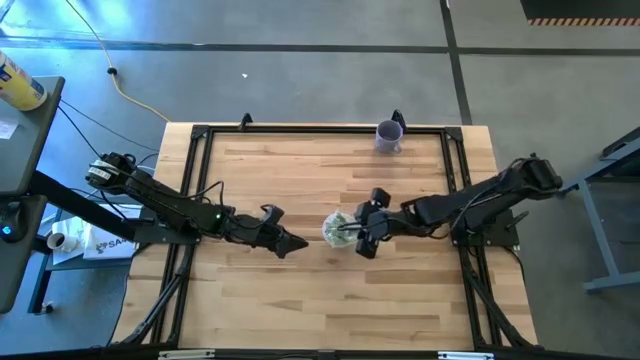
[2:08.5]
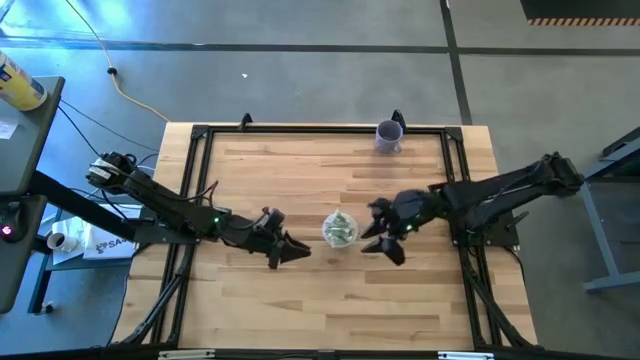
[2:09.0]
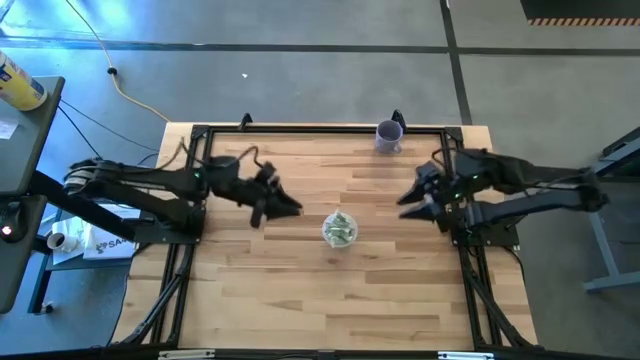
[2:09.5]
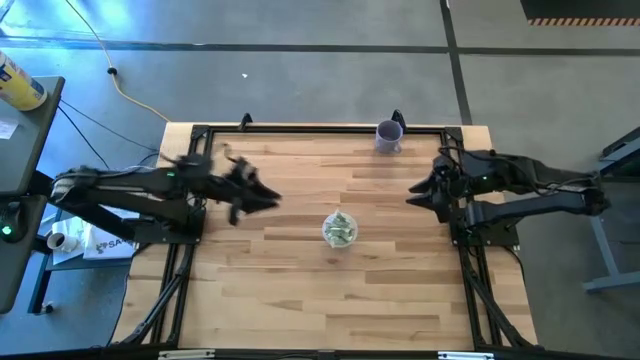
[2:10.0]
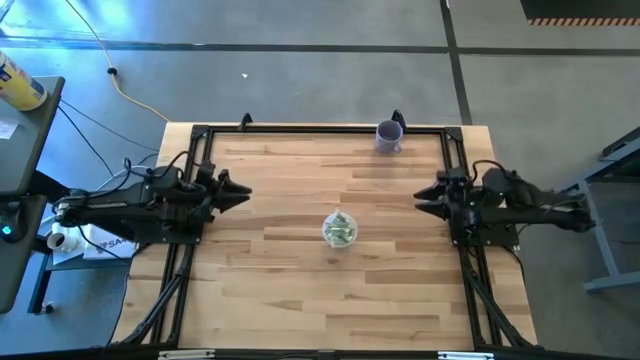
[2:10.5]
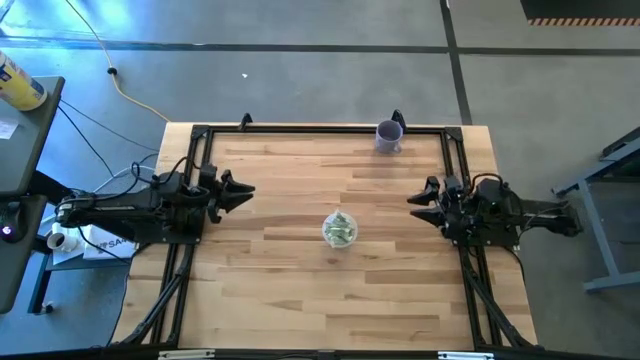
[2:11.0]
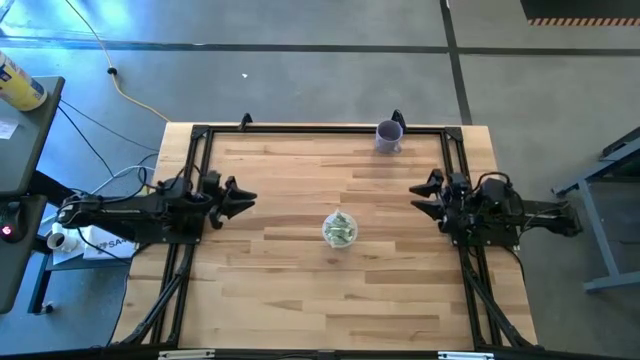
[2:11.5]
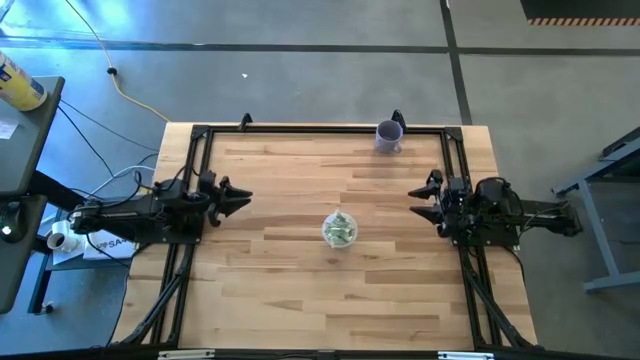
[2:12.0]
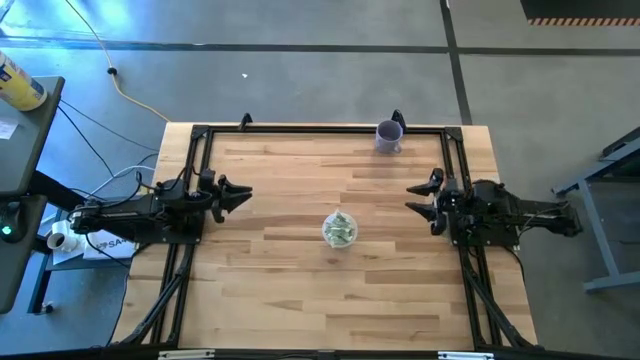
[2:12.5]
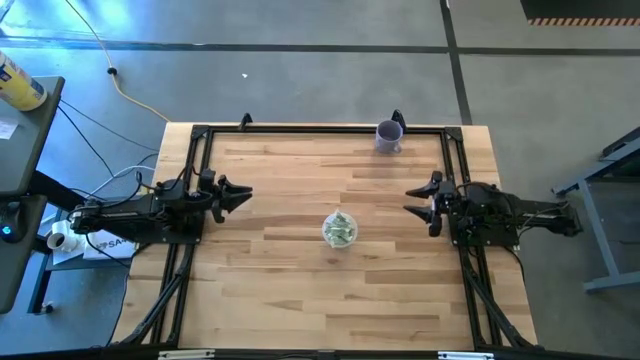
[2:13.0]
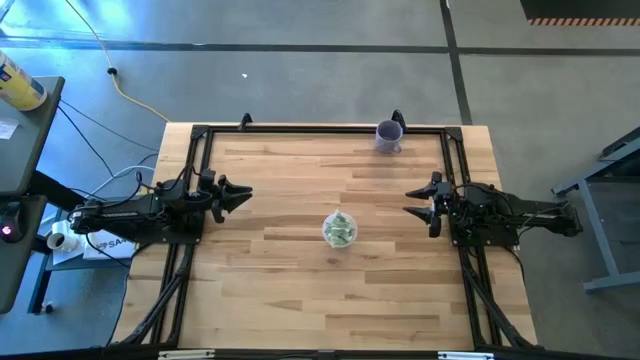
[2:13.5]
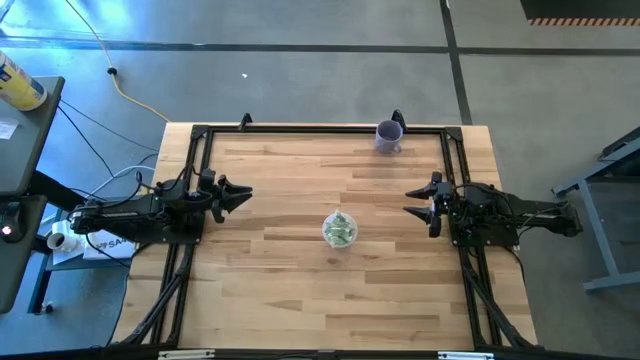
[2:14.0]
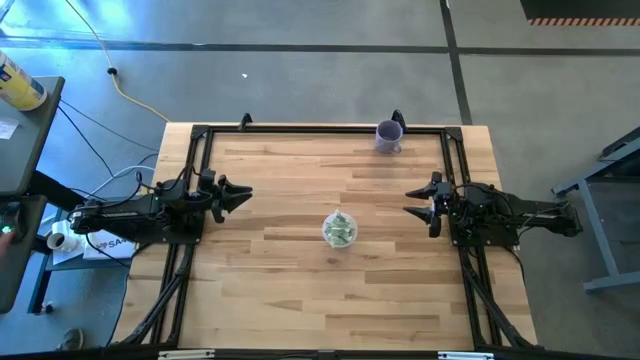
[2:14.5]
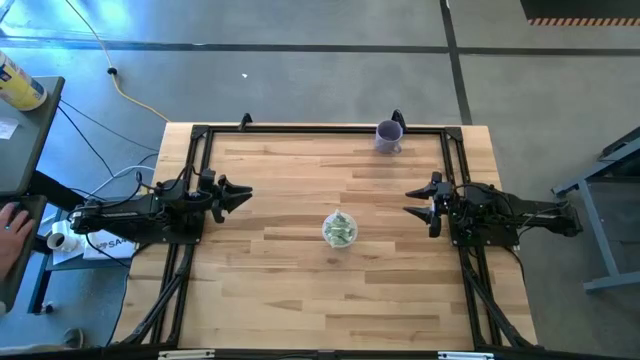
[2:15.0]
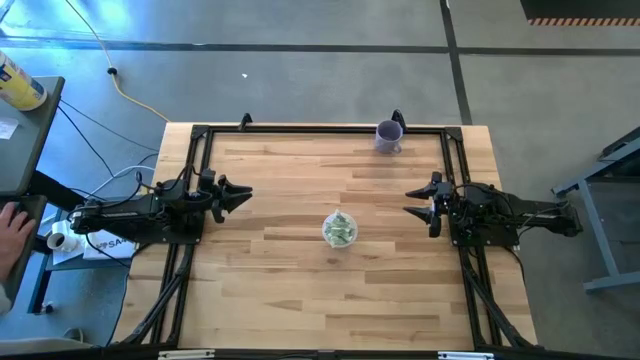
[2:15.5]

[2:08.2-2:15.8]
Task: Pick and place Stevia / Truvia into bins
Return to Home Position

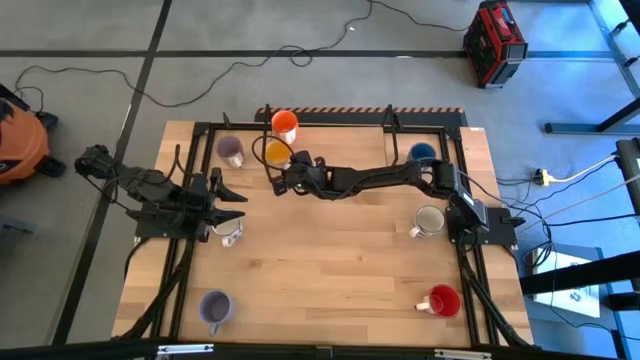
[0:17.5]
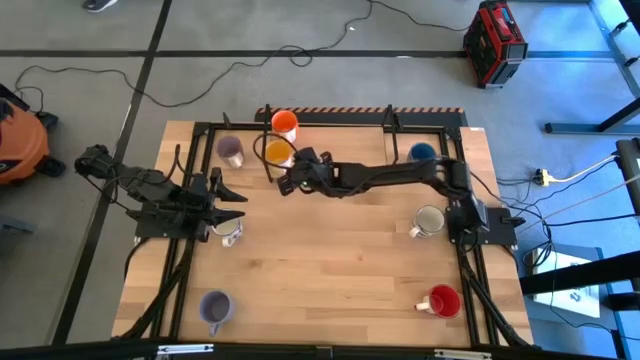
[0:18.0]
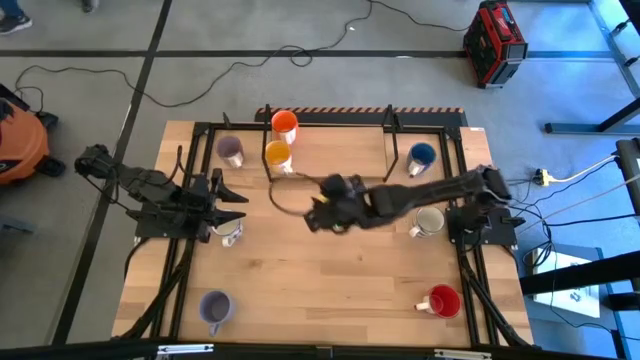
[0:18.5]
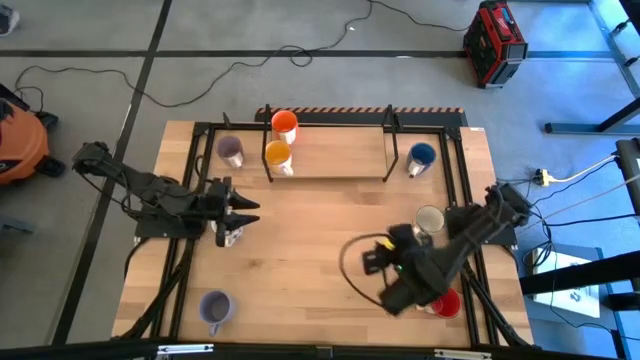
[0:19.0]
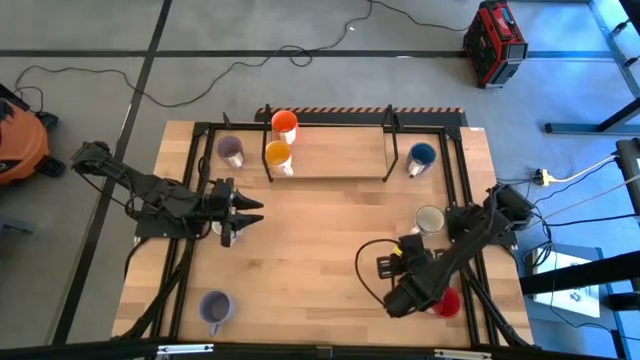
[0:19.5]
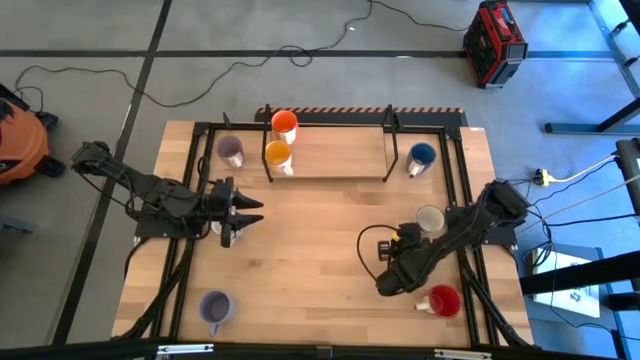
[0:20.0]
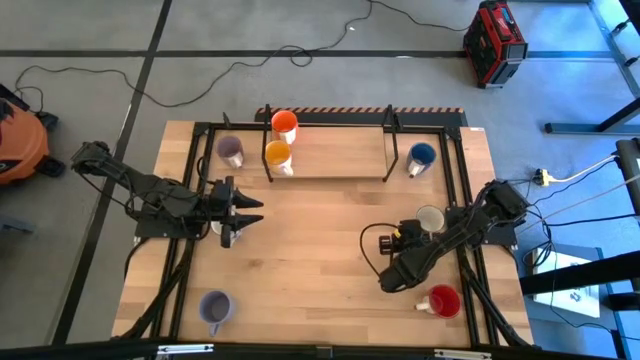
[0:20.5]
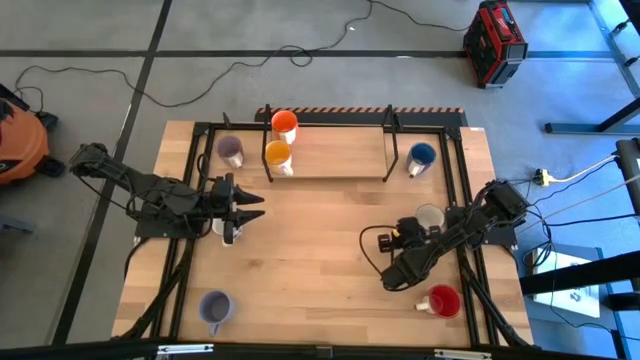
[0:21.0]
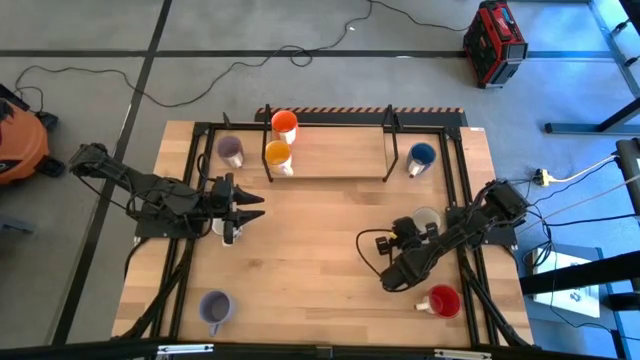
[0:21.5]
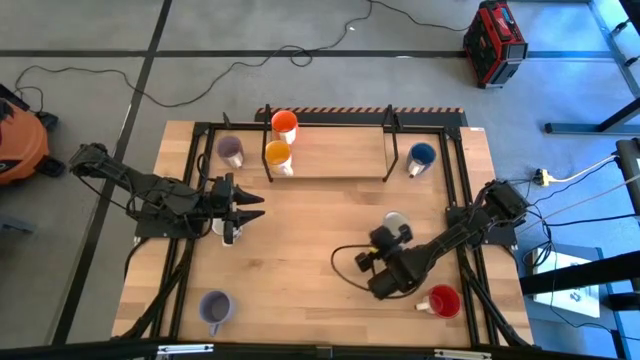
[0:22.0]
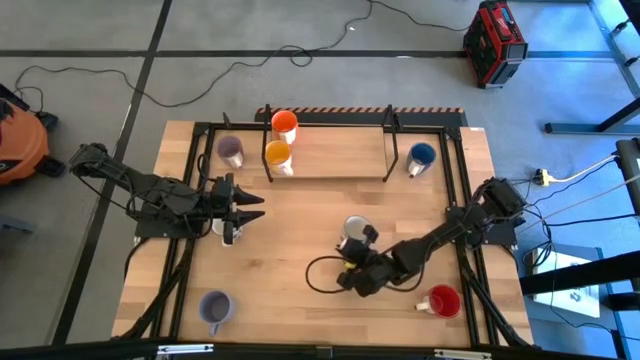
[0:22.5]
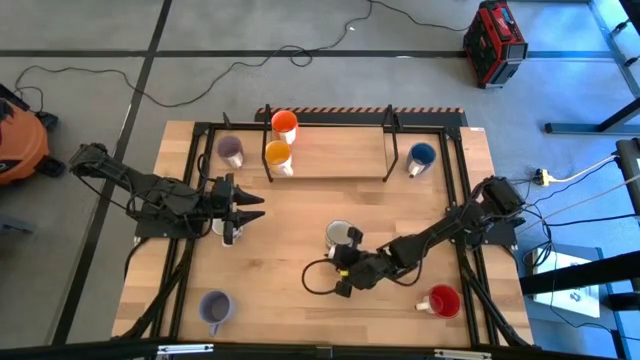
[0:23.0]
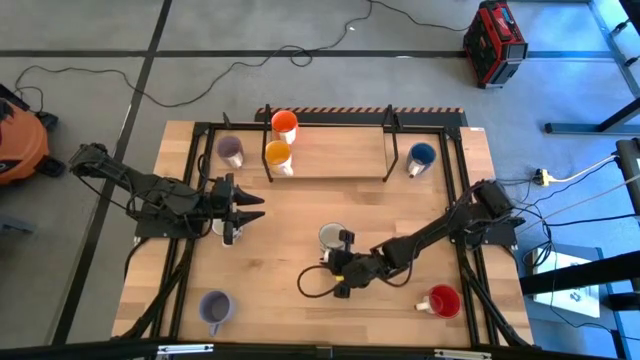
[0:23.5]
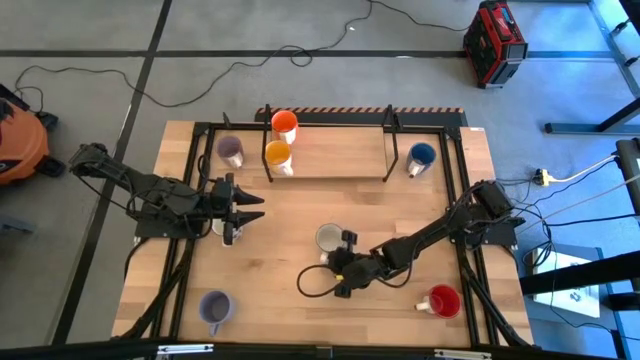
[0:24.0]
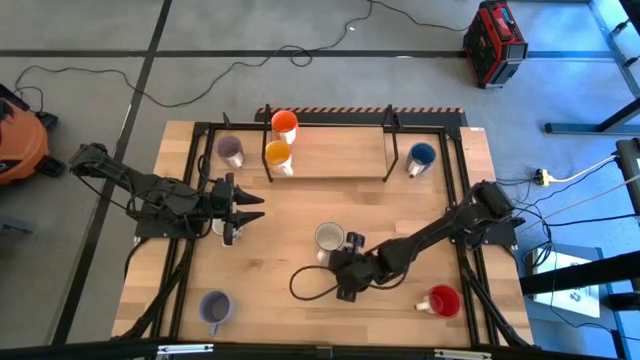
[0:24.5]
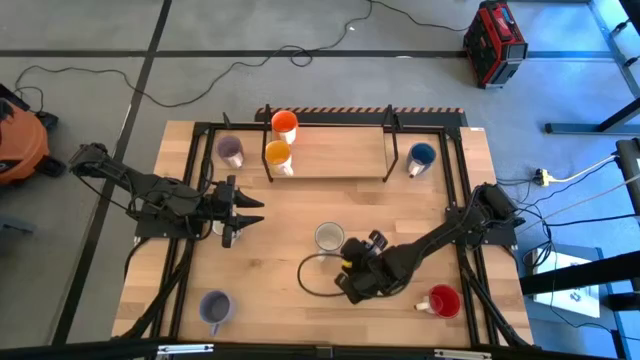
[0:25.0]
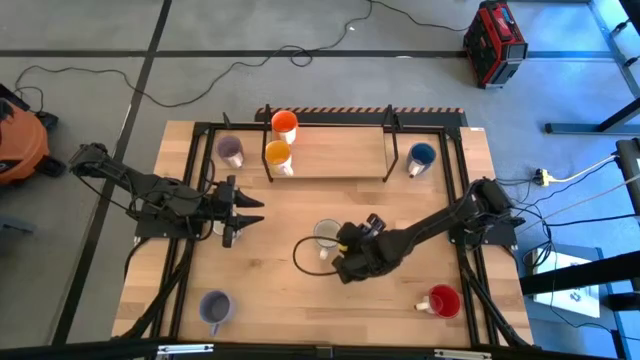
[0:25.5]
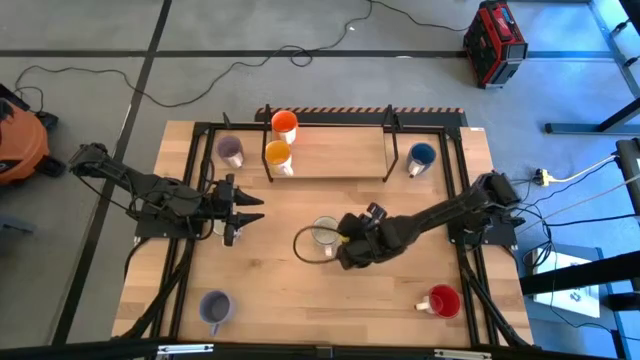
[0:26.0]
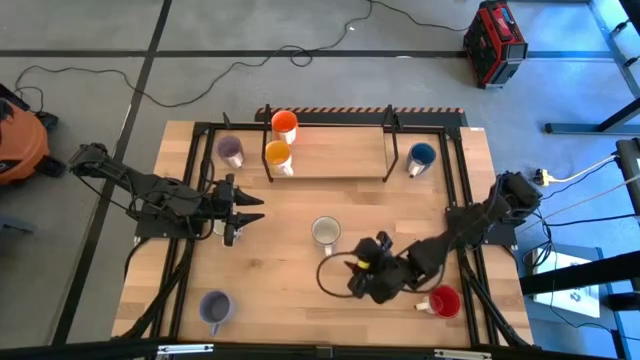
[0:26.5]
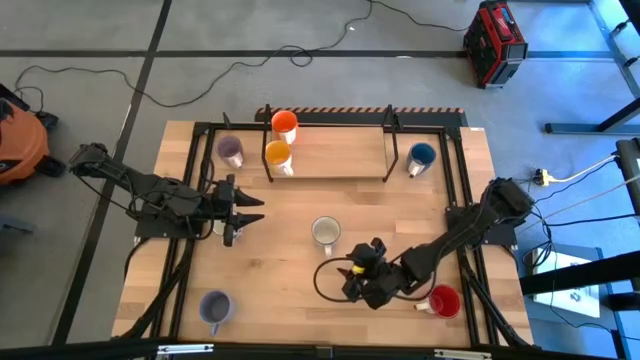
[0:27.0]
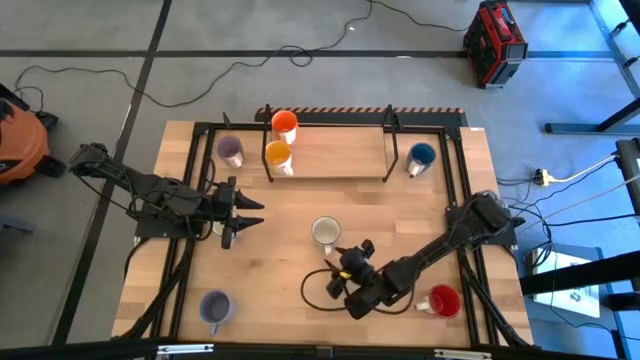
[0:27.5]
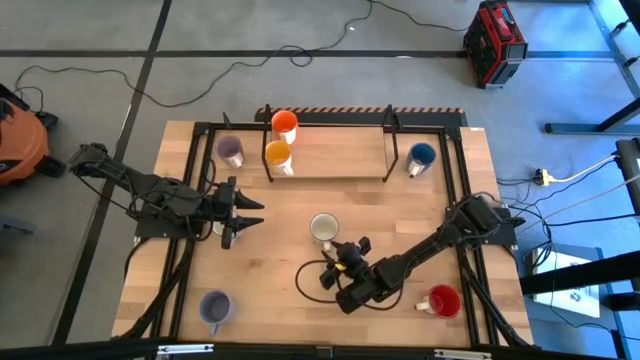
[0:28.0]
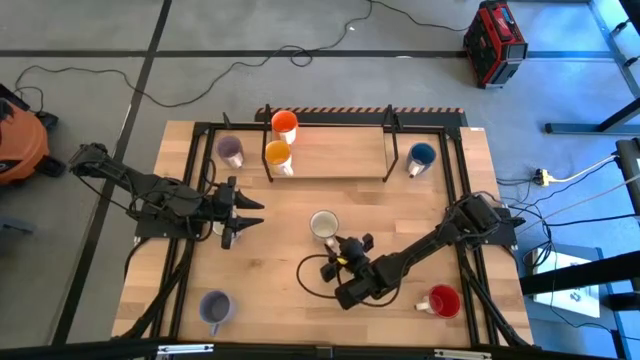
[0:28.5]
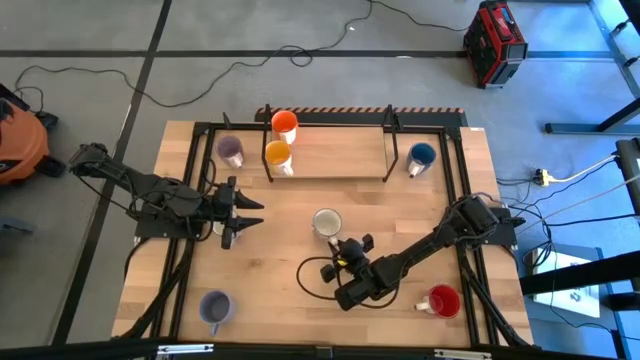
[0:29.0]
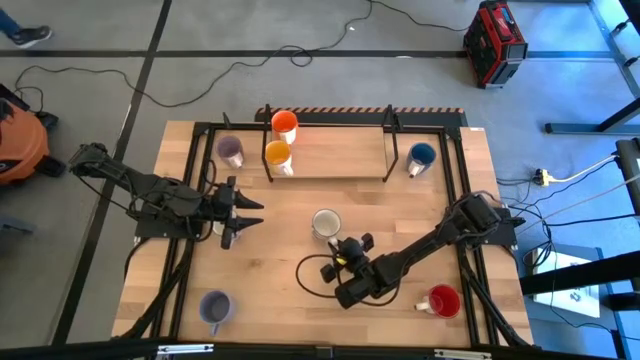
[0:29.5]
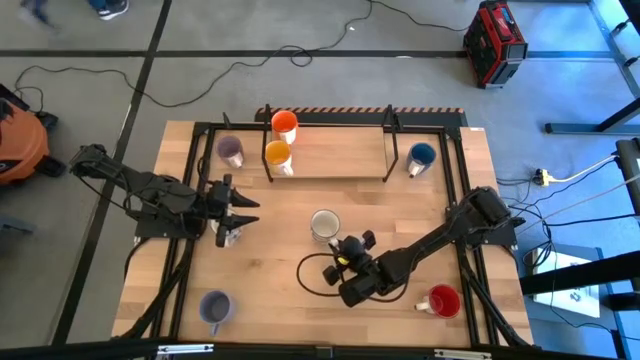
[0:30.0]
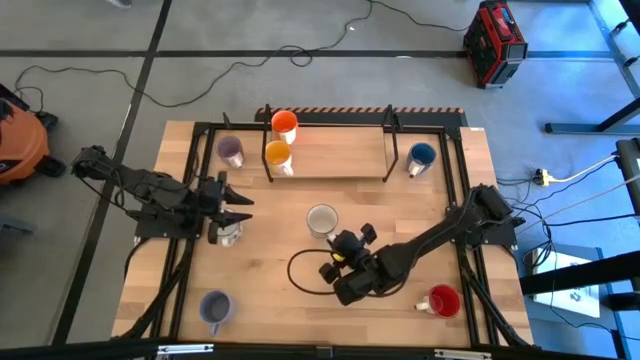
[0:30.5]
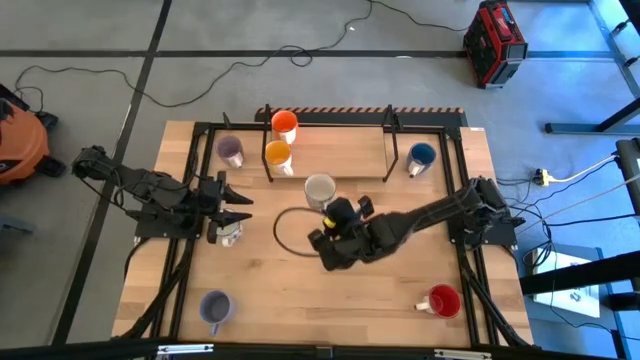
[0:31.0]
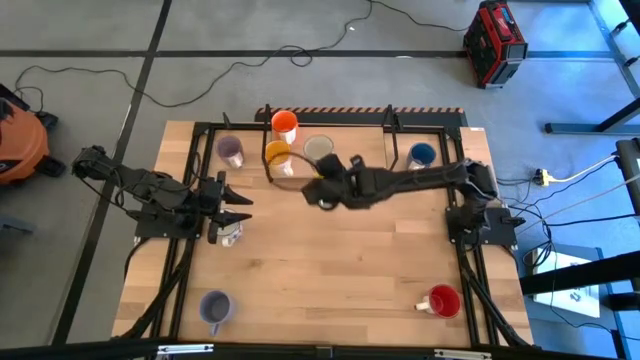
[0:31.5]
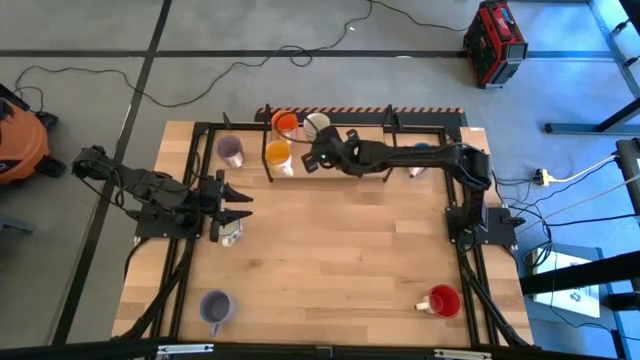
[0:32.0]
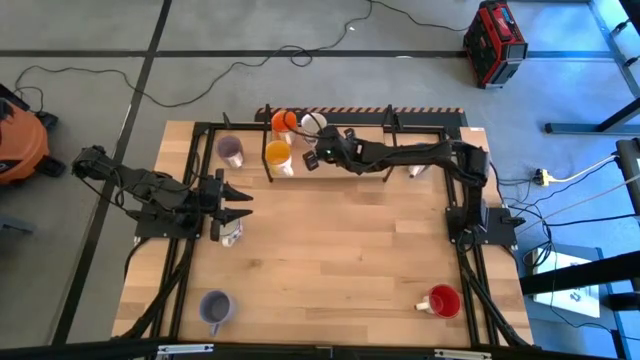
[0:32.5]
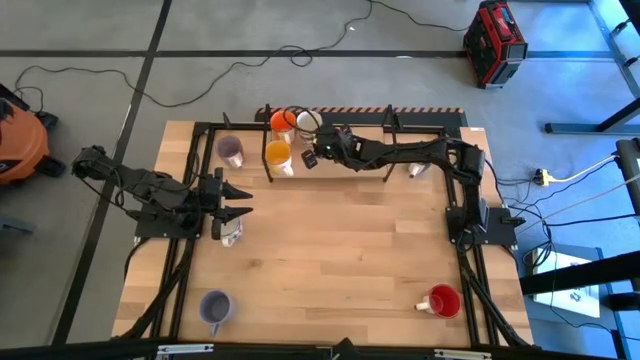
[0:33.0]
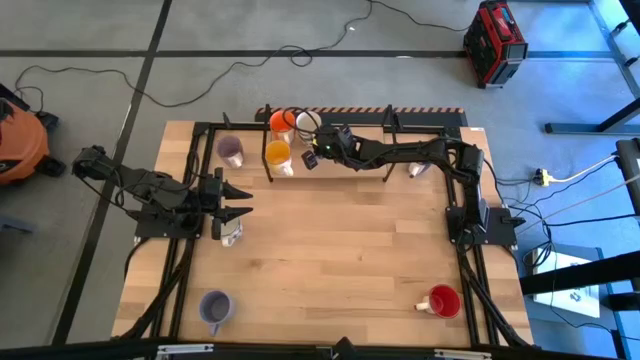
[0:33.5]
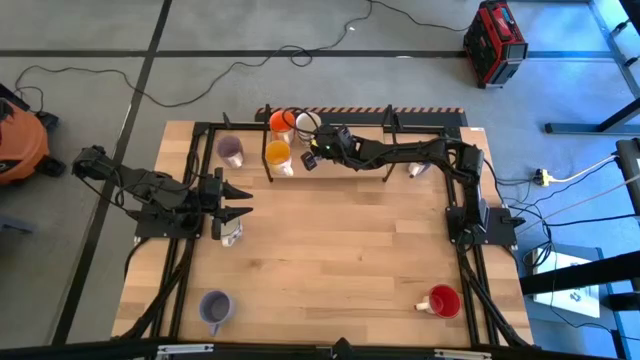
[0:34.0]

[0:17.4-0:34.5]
Task: Place coffee mugs
Put the right white mug on the shelf
